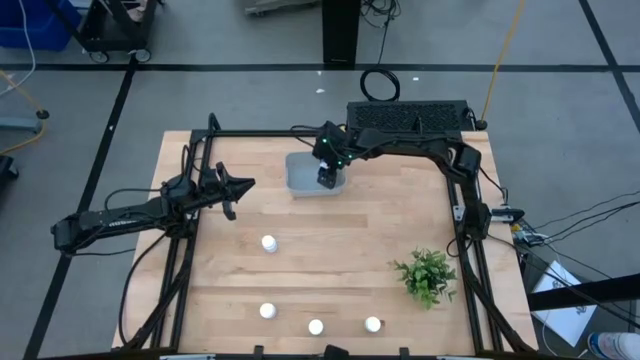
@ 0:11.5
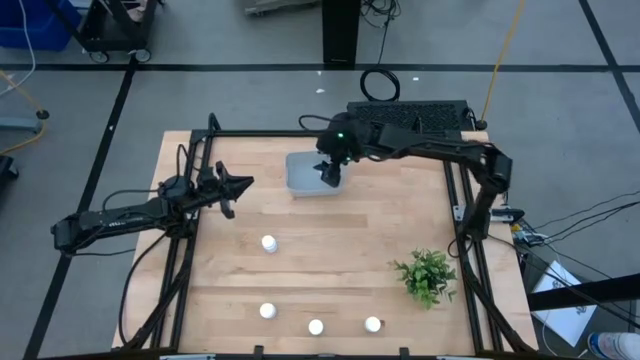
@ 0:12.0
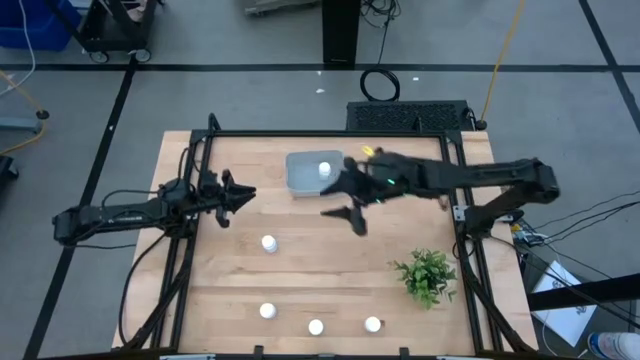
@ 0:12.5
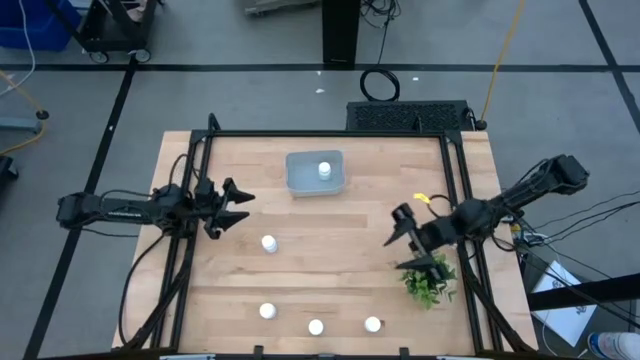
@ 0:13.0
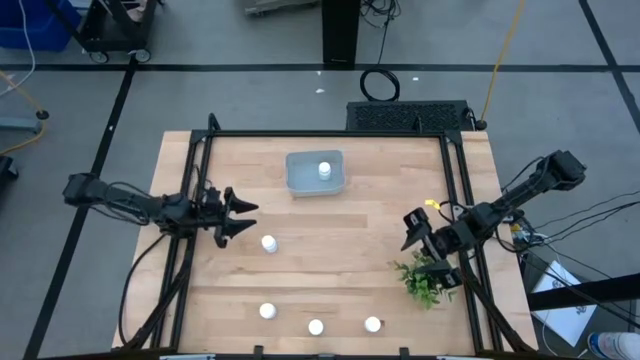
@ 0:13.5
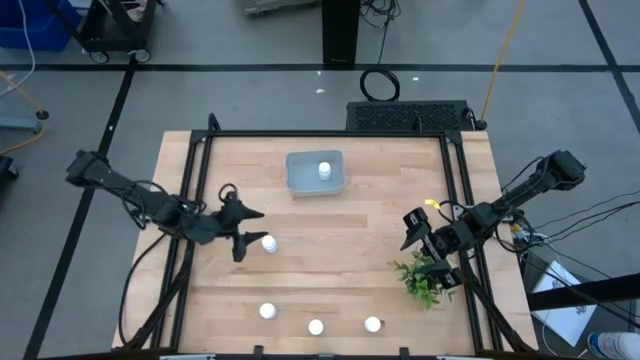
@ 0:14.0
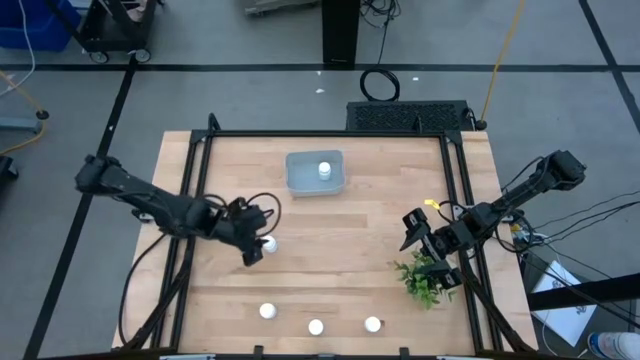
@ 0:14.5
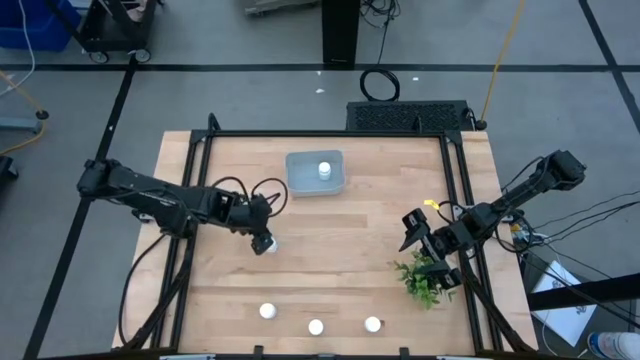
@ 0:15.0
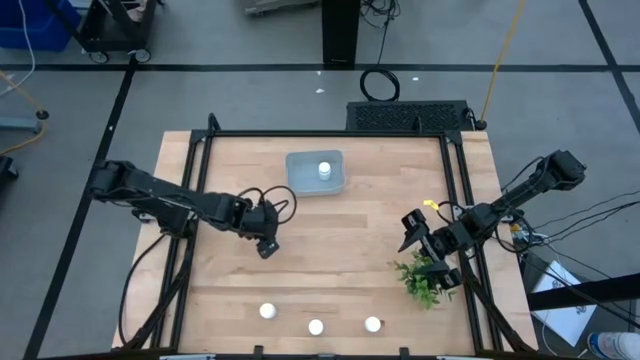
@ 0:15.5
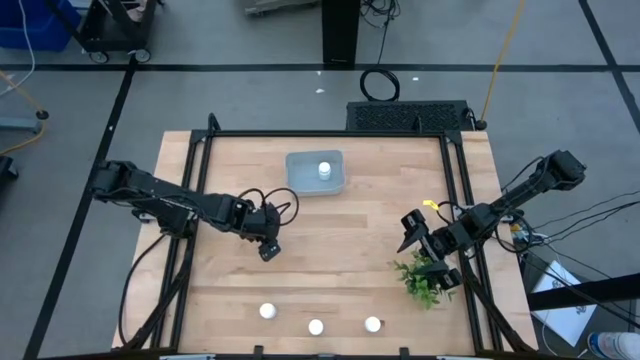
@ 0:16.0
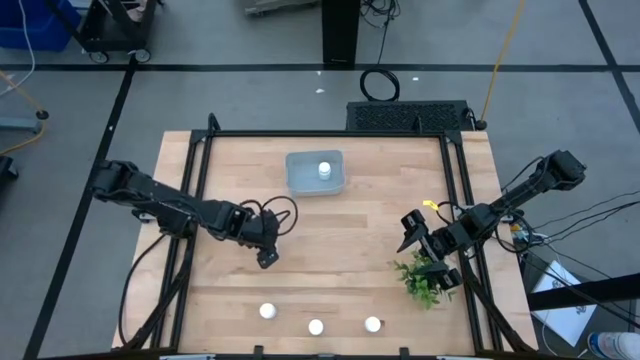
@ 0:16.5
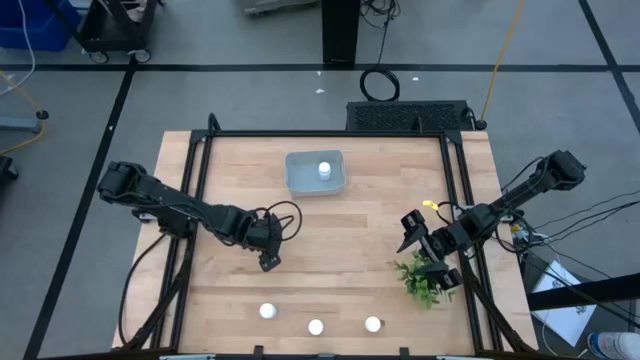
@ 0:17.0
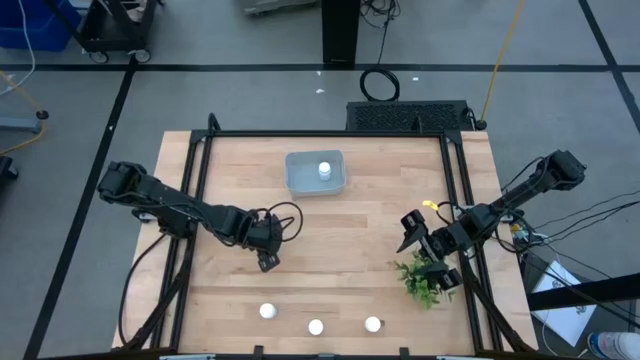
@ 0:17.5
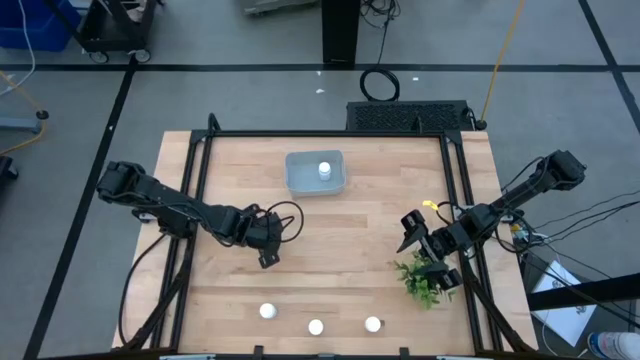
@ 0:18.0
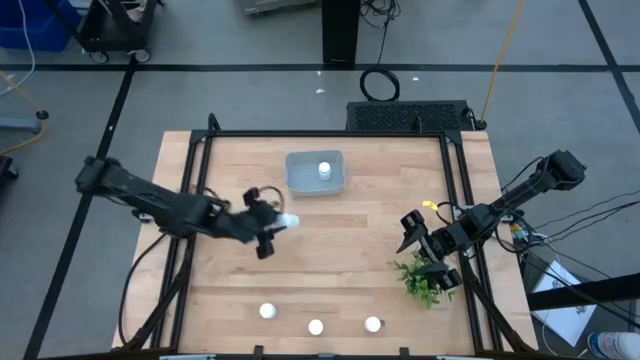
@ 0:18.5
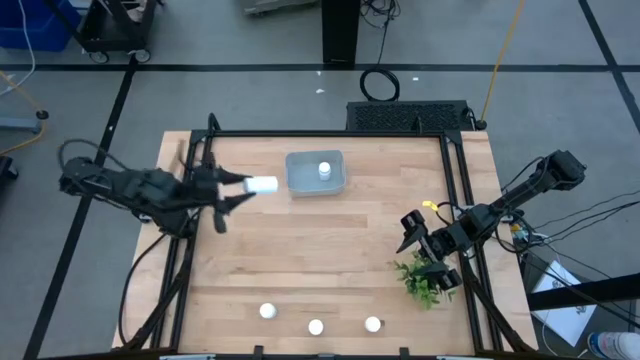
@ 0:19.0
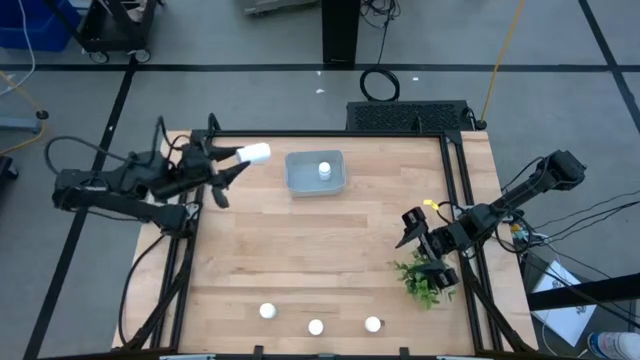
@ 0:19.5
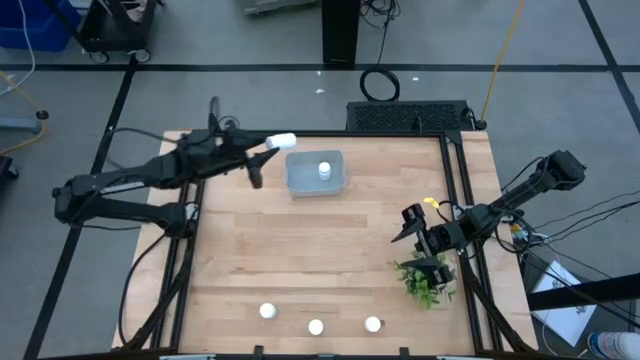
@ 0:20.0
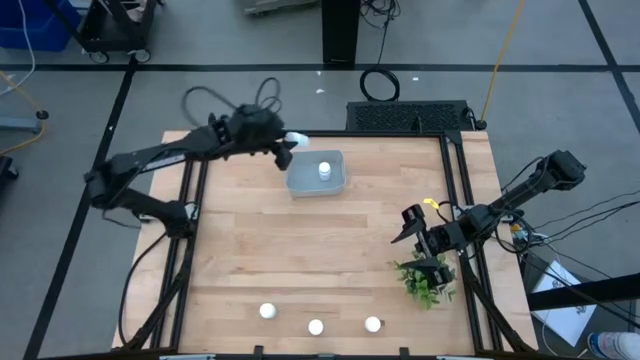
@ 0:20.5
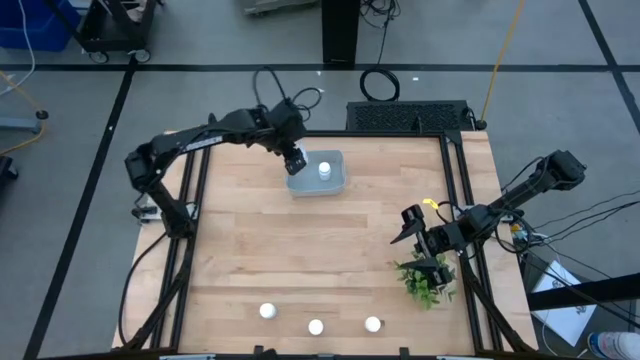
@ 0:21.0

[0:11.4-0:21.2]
Task: Pick and place pill bottles into a basket
Put the white bottle into the gray bin

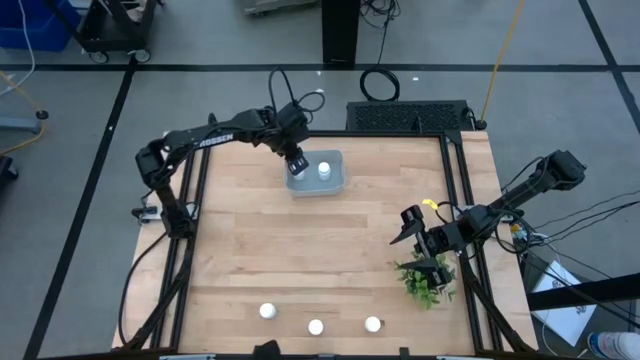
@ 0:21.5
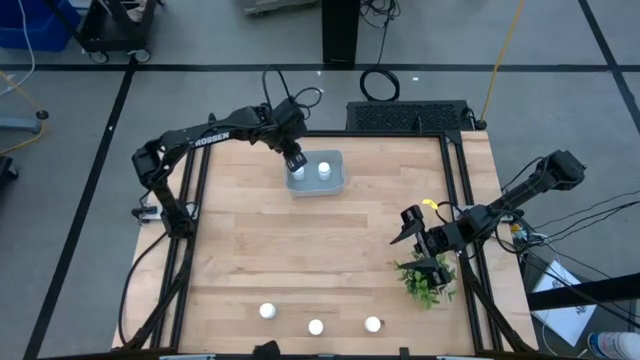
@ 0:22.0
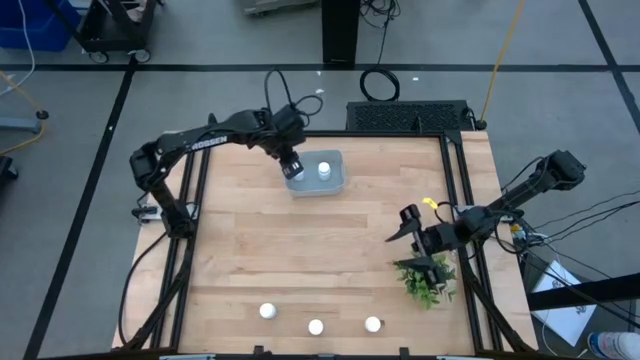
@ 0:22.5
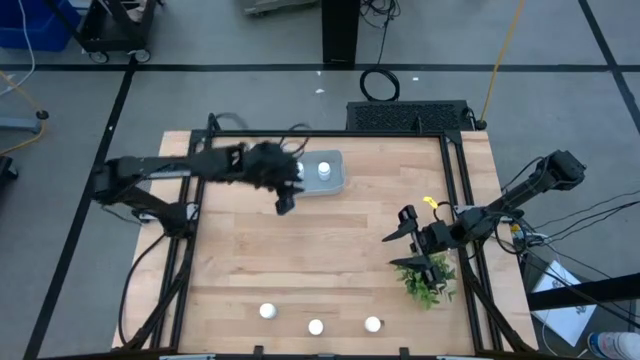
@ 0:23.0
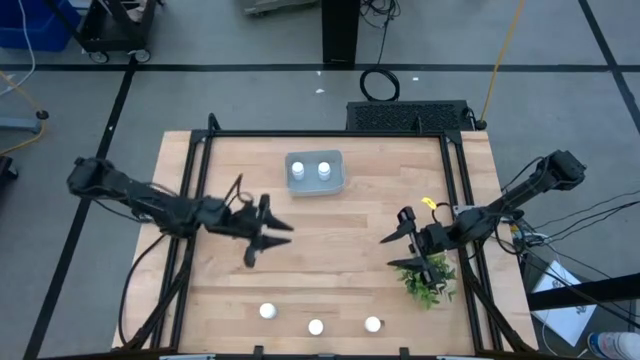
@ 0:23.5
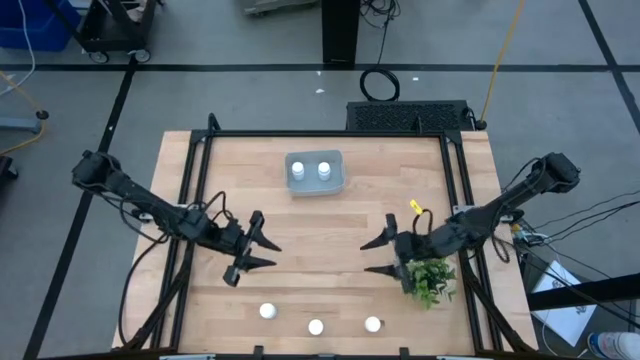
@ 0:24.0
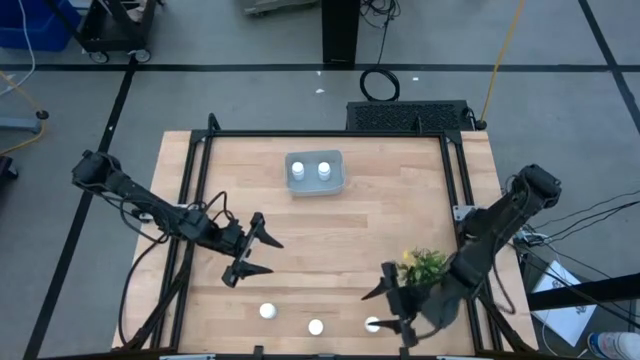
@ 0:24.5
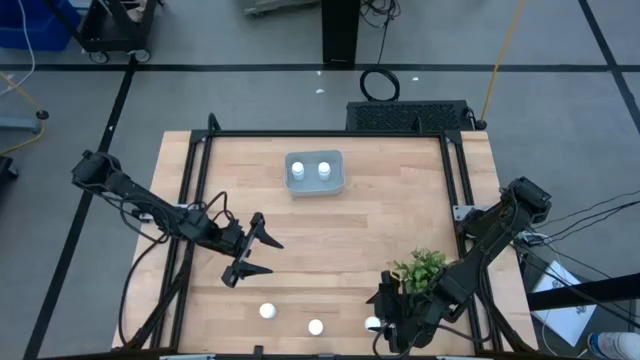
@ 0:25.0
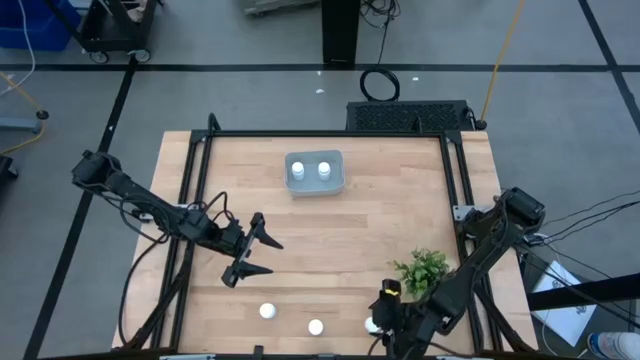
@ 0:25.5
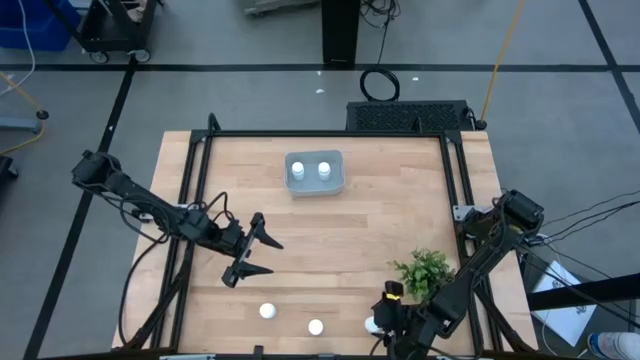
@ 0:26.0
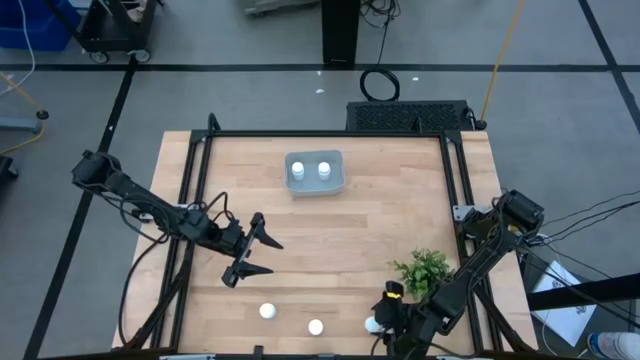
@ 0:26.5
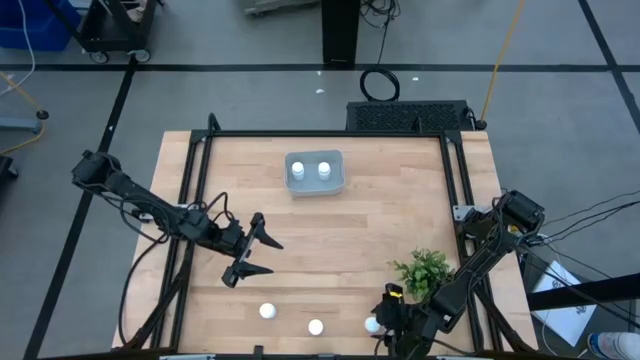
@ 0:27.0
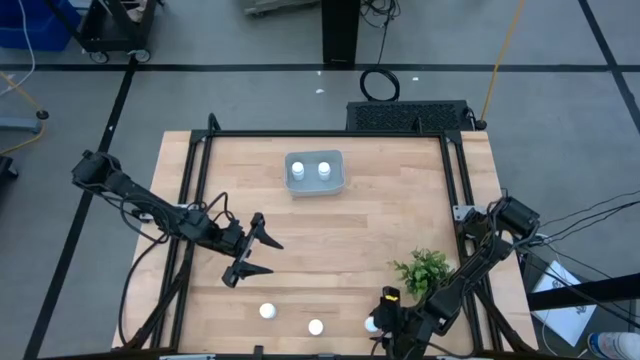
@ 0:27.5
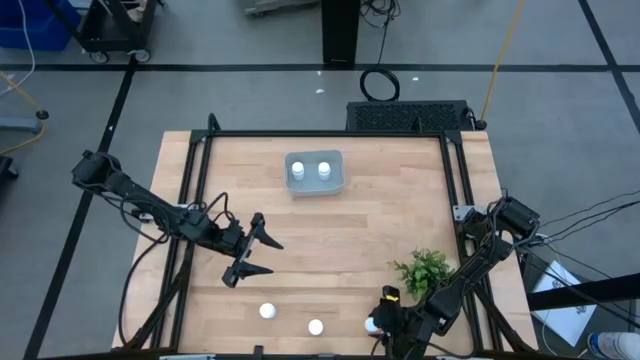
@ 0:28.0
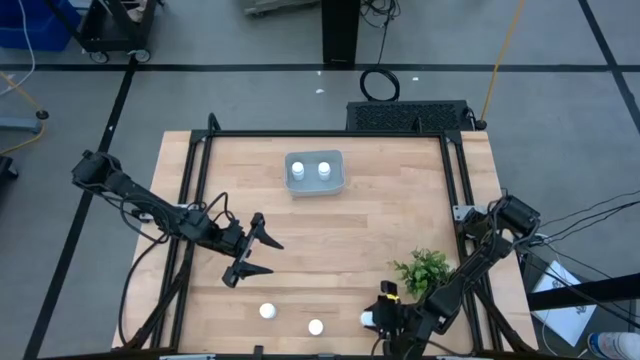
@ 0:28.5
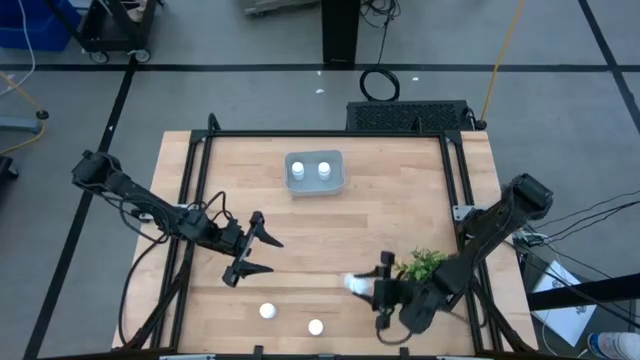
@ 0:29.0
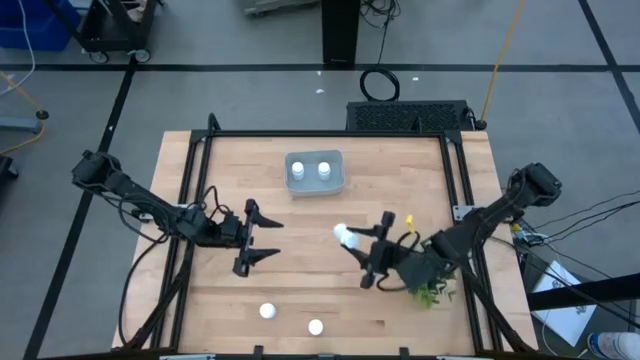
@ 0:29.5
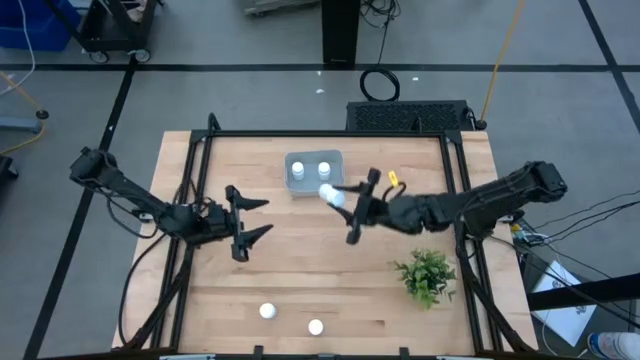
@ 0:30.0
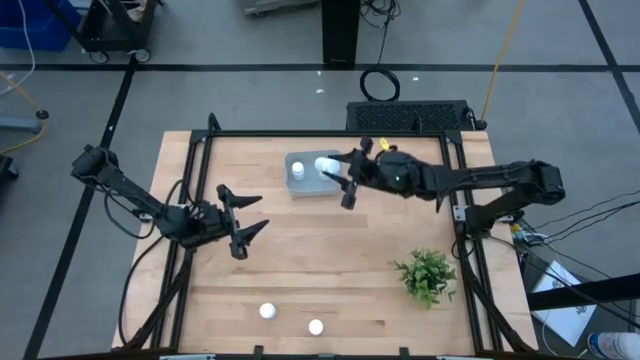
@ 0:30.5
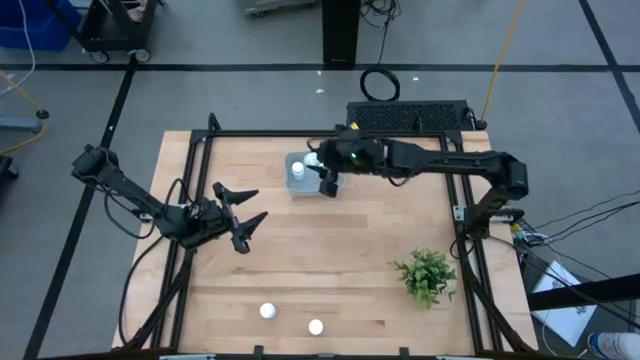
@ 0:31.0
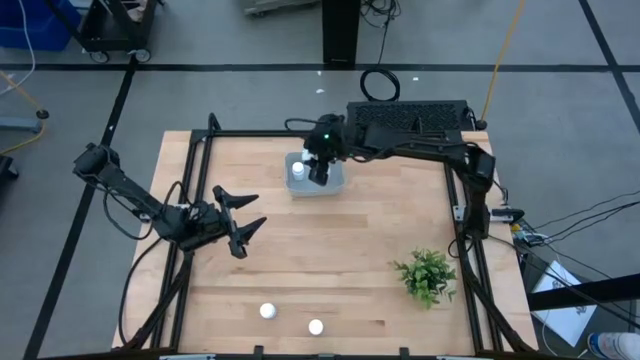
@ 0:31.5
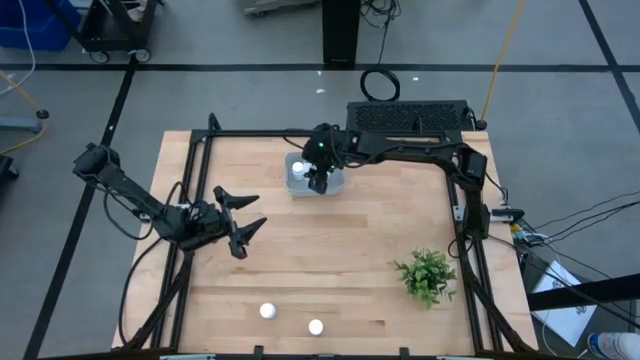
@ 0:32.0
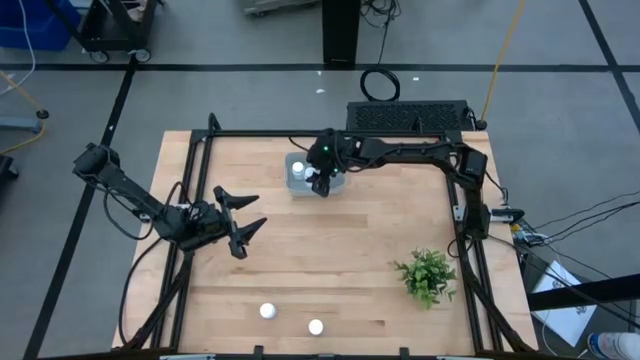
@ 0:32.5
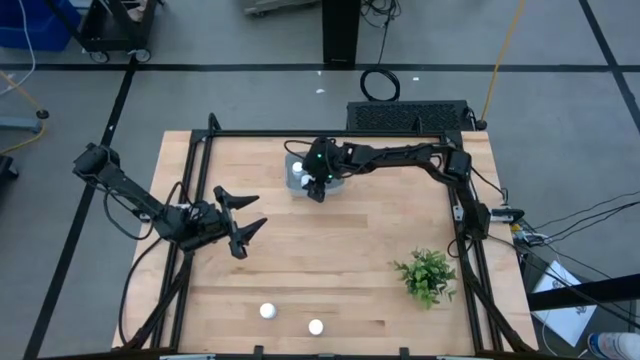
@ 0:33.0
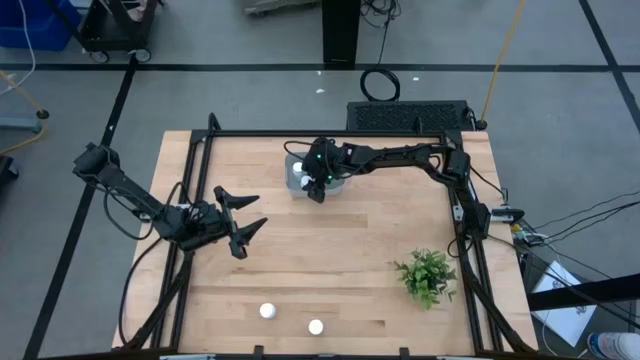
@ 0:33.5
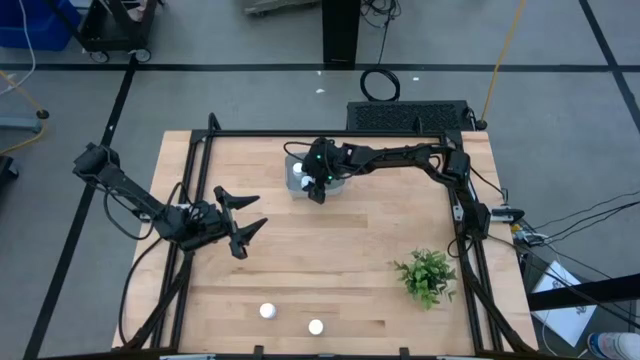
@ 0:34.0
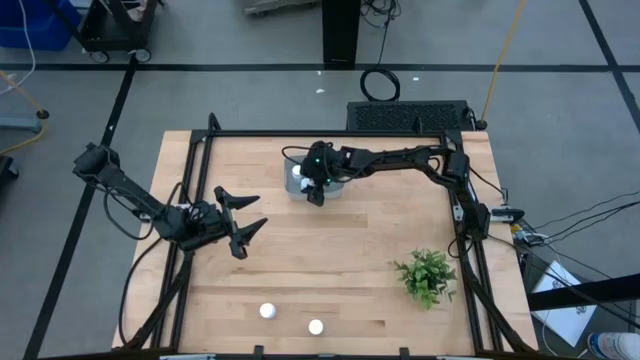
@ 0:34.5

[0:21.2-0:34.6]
Put the white bottle into the gray bin
